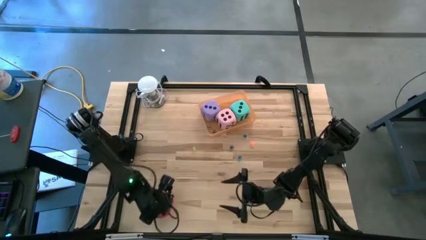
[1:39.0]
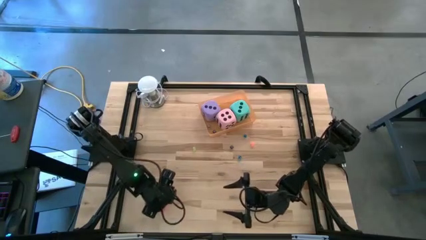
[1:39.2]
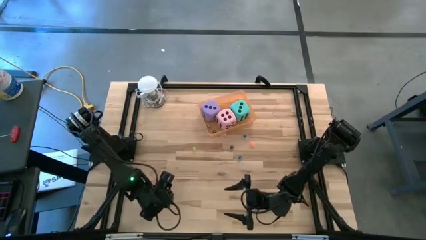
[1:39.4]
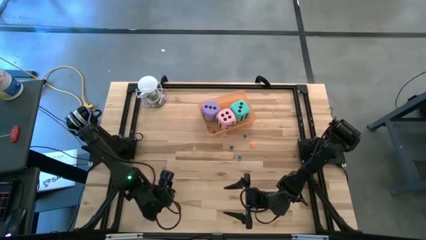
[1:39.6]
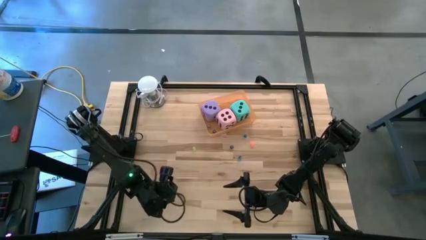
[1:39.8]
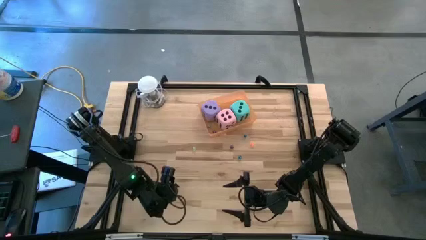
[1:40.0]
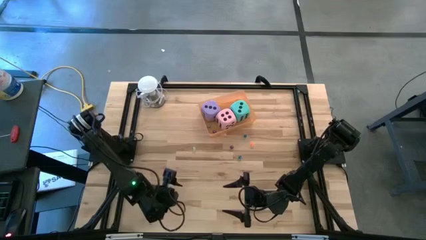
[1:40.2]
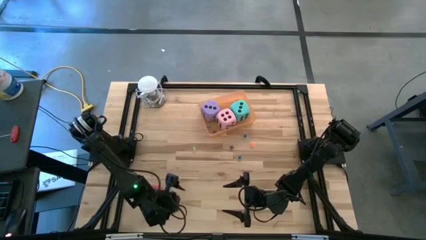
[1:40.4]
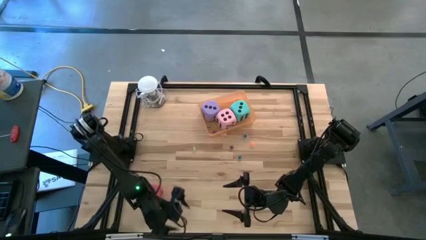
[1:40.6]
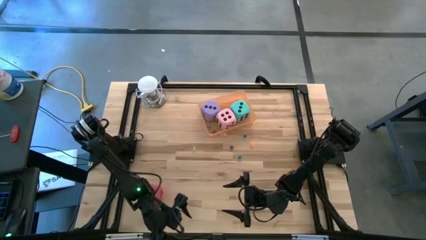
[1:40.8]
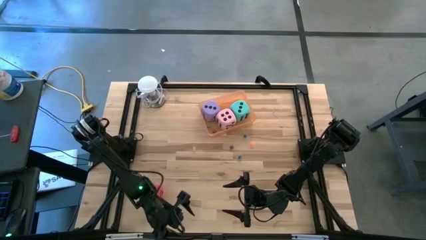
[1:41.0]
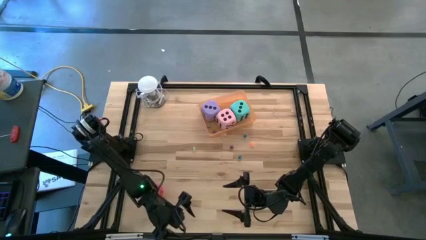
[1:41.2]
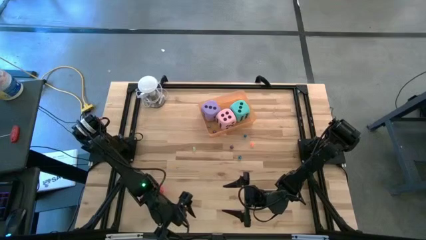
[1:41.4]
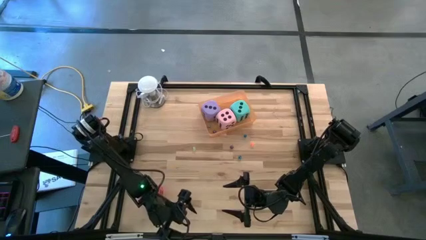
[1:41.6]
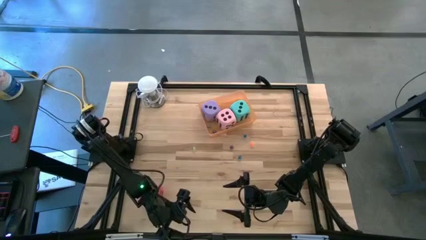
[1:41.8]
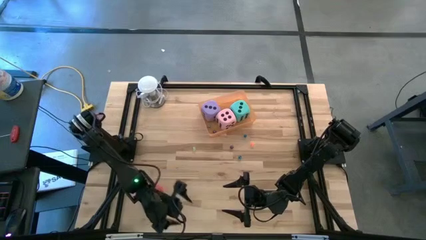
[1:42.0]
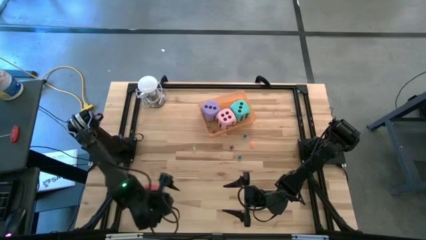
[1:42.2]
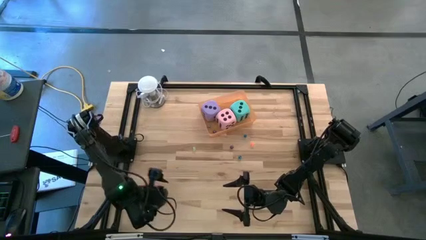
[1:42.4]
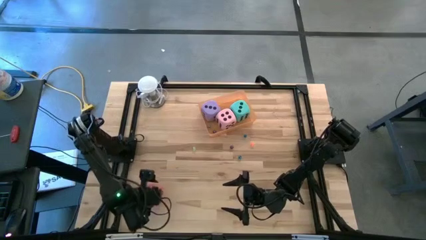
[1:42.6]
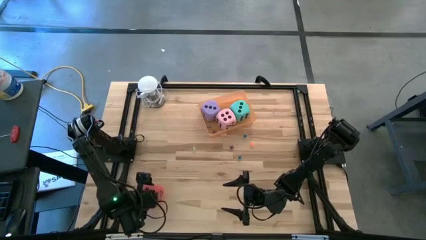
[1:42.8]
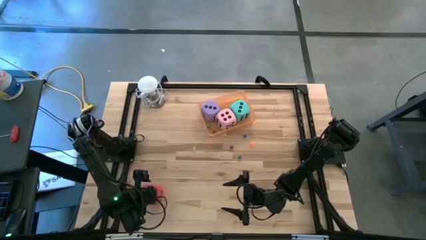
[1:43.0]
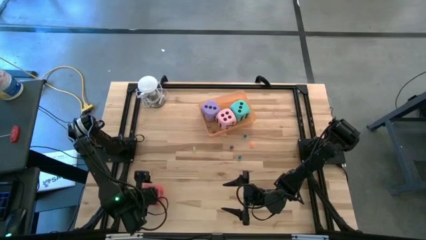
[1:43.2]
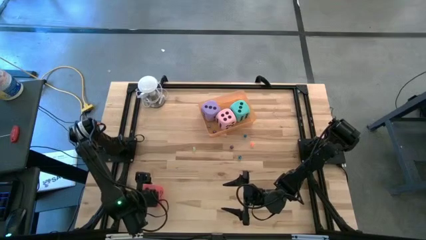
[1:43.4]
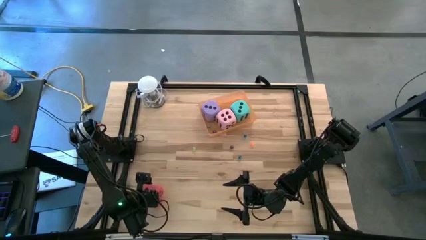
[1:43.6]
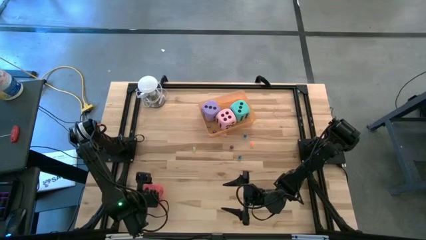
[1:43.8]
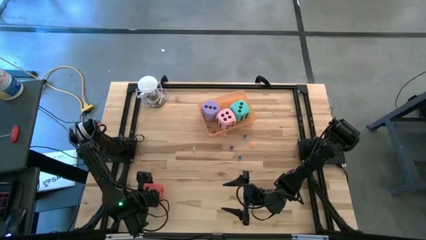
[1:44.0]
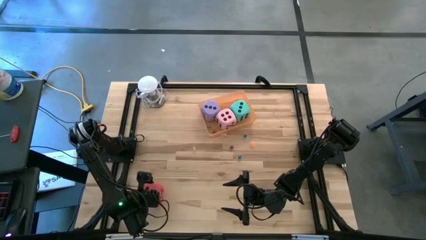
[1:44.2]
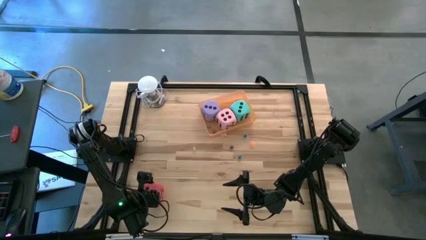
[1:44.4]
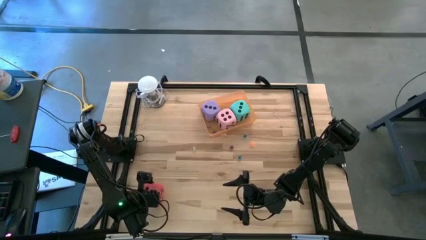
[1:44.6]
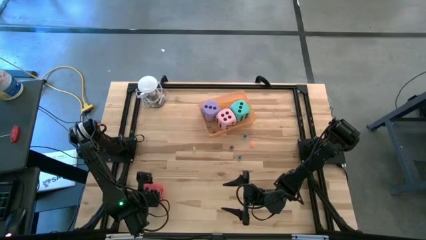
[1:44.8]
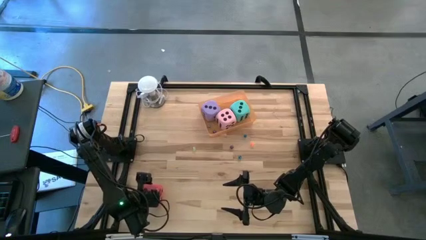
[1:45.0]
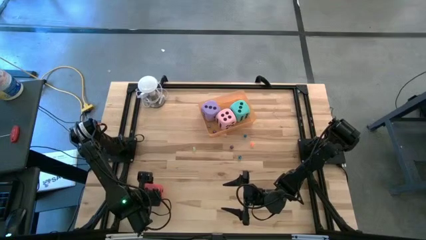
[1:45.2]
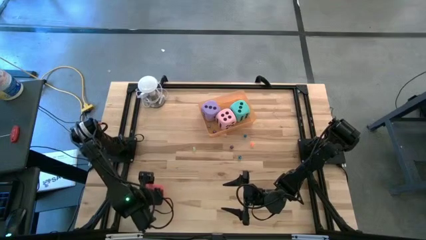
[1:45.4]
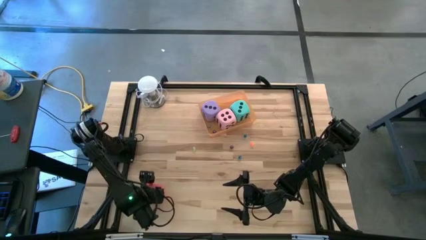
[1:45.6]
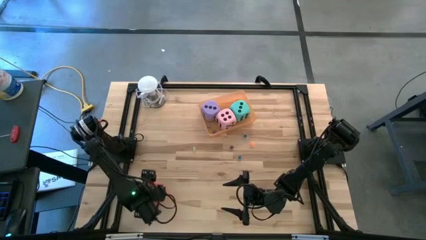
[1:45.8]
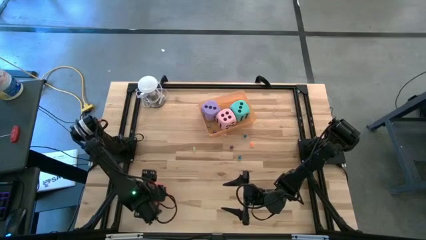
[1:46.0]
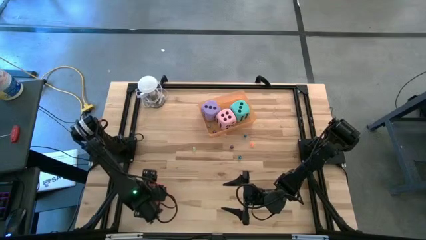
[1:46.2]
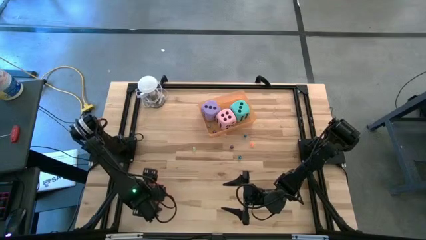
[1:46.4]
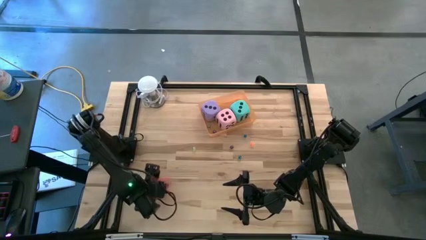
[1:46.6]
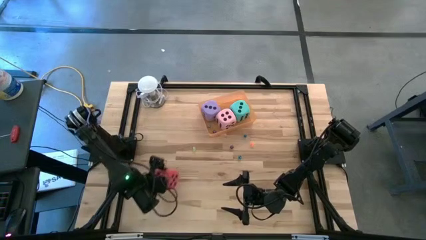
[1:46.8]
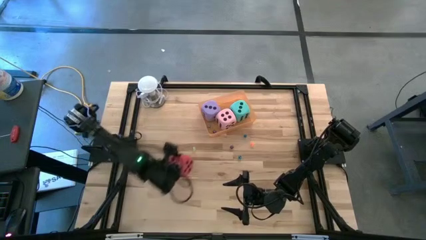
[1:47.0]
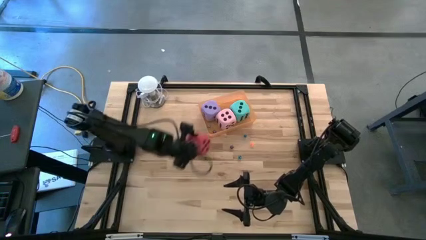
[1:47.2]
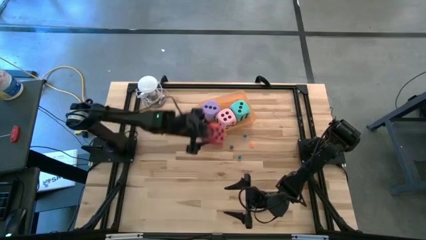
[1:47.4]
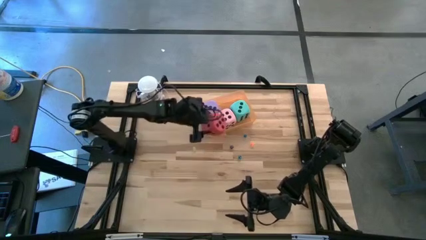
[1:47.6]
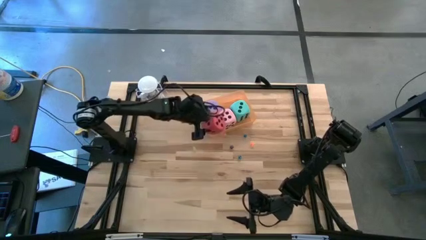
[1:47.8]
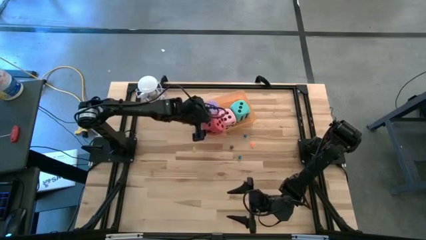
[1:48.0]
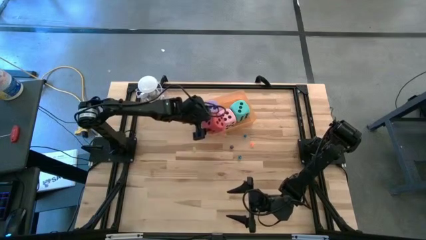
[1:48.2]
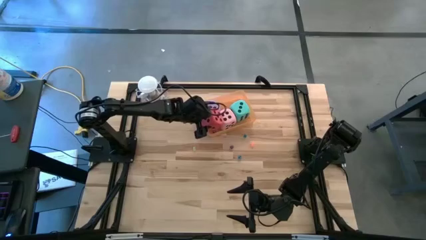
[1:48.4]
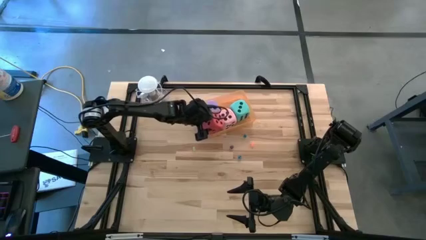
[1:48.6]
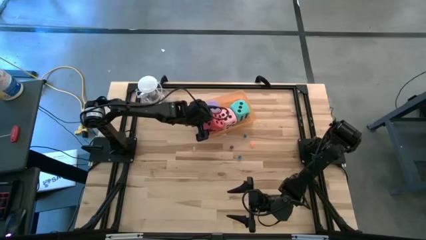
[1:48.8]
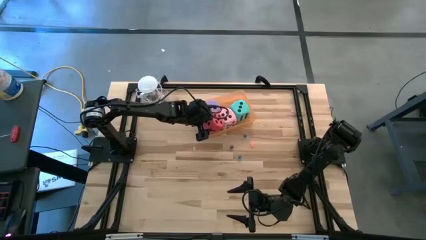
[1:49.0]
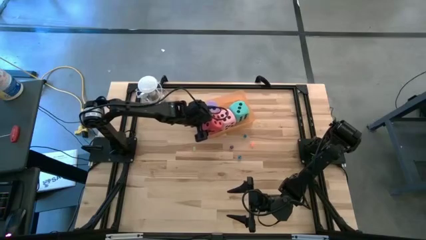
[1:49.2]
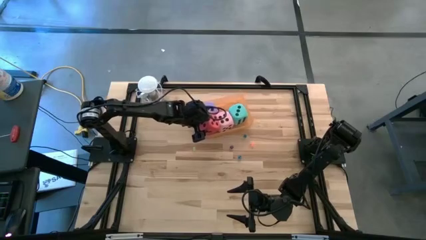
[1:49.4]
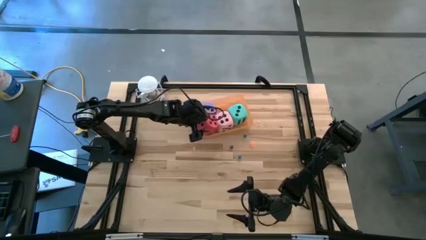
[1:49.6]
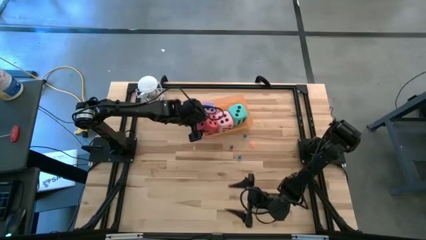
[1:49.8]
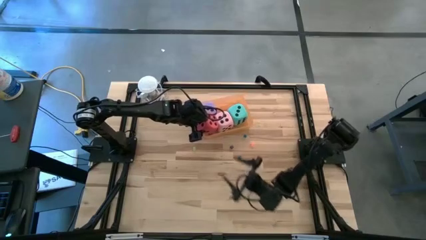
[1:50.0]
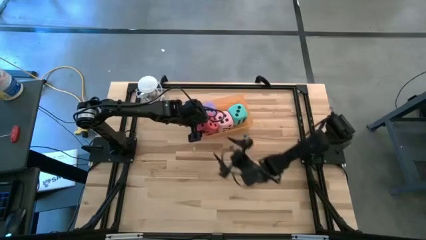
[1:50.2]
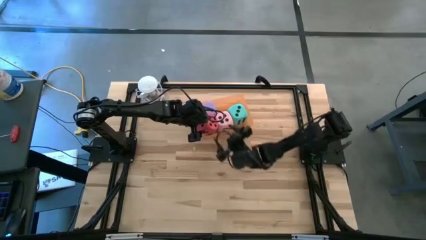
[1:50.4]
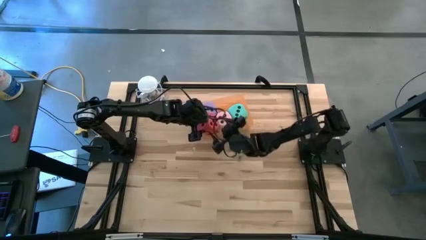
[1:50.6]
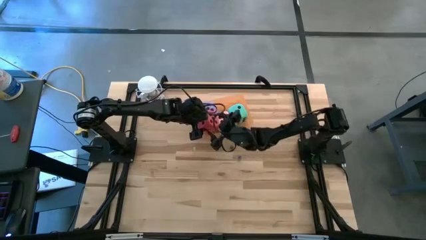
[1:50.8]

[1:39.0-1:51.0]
Task: Pick & Place Dice
Put the big red die into the orange bin
